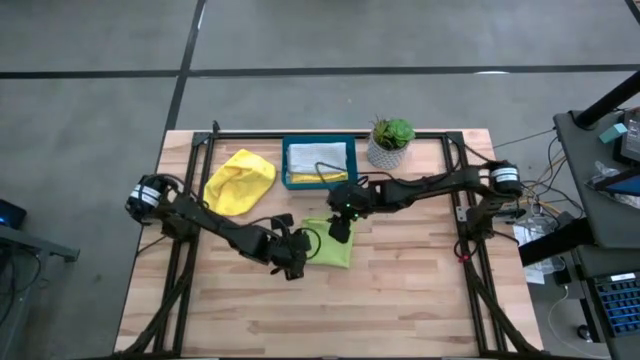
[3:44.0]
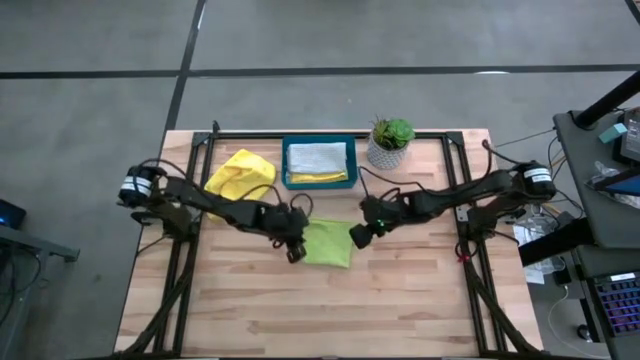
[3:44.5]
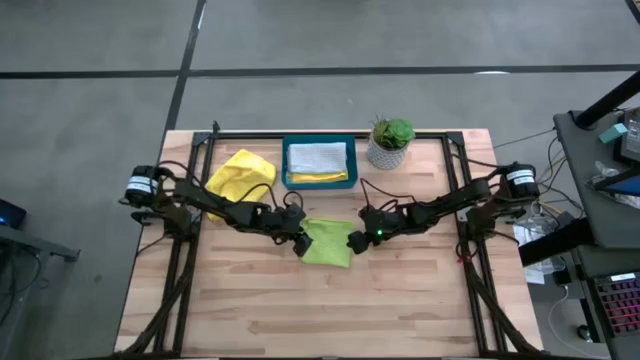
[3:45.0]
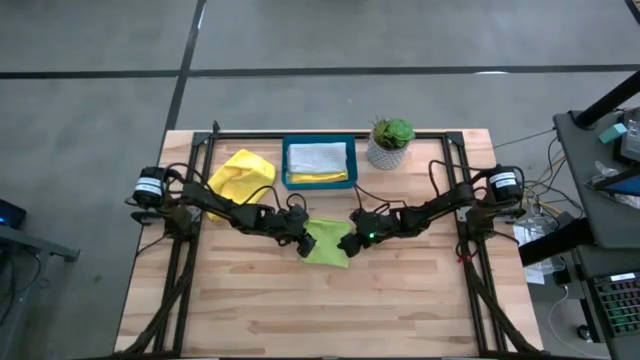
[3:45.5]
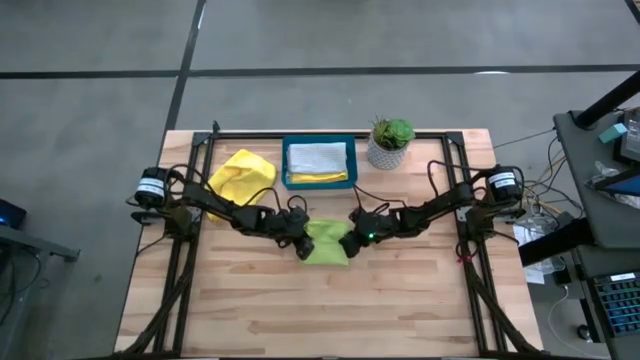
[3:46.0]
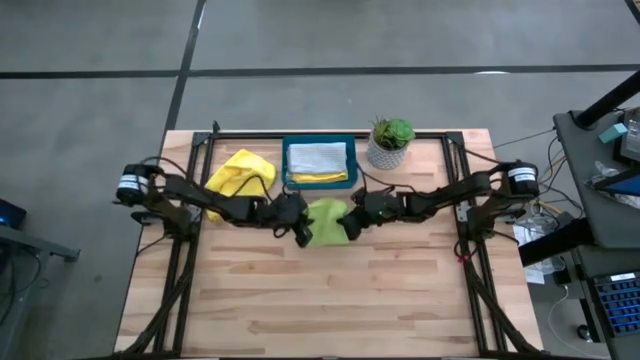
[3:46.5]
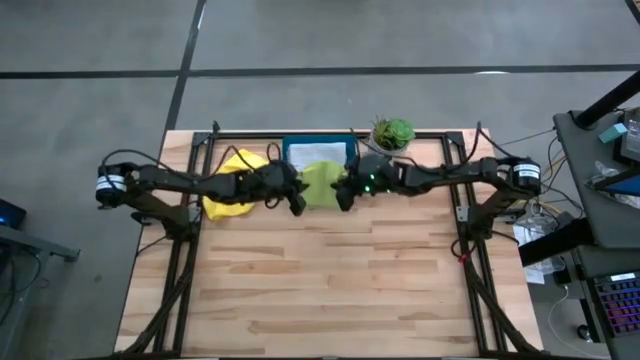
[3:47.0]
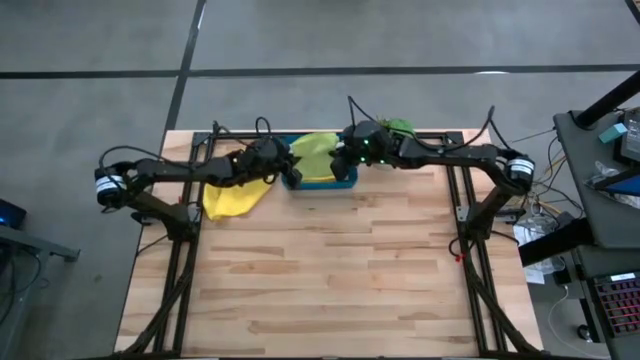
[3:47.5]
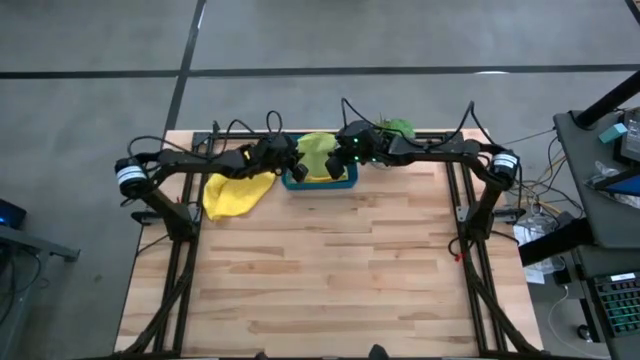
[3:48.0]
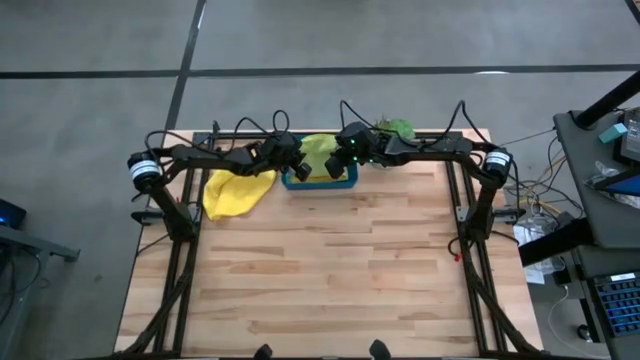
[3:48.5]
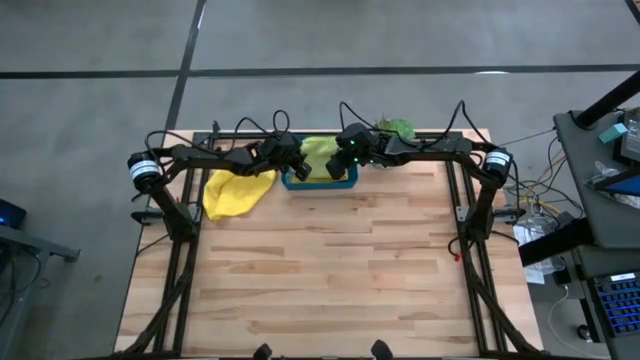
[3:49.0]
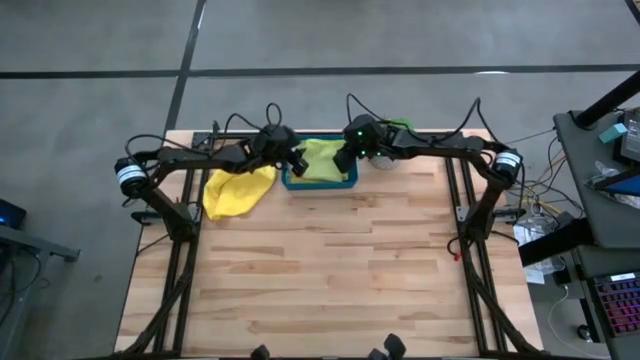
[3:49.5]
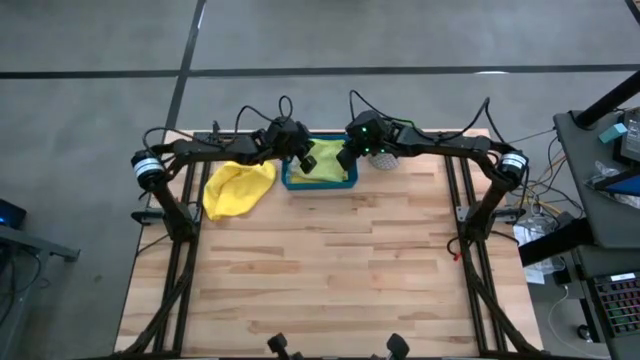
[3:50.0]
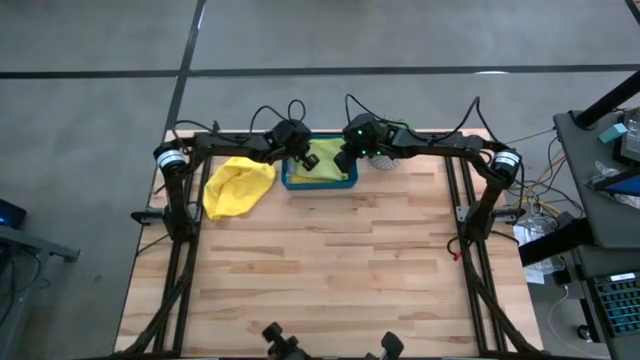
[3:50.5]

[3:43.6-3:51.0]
Task: Fold microfiber towels
Stack the folded green microfiber cloth on top of the gray microfiber cloth

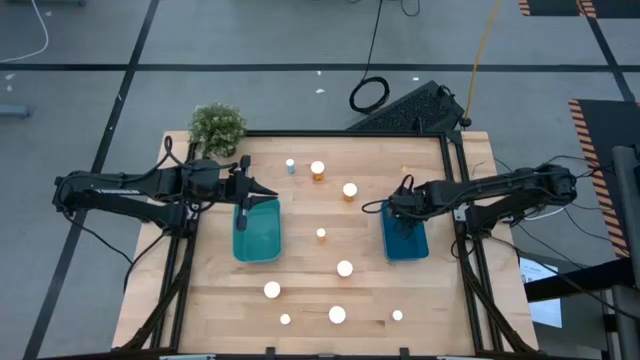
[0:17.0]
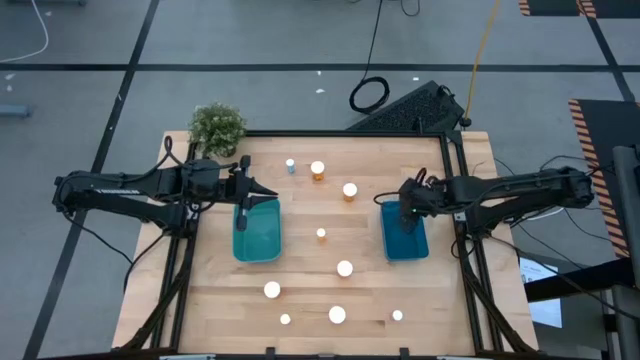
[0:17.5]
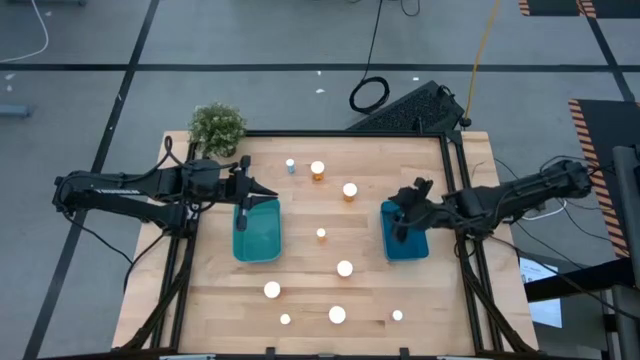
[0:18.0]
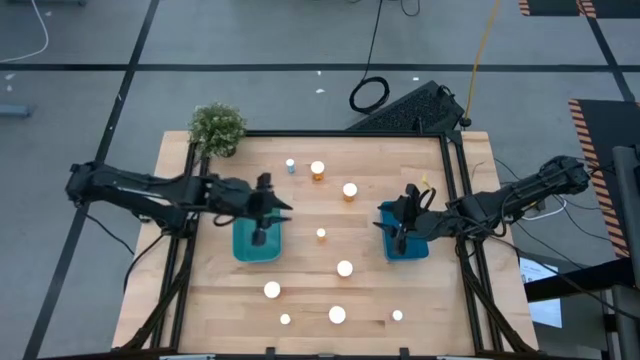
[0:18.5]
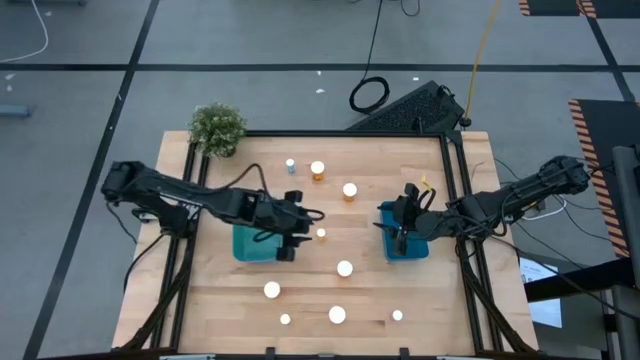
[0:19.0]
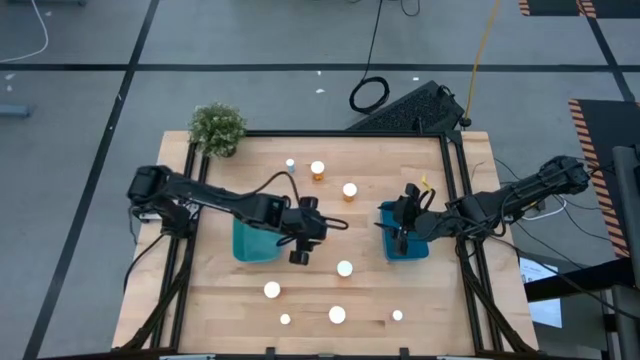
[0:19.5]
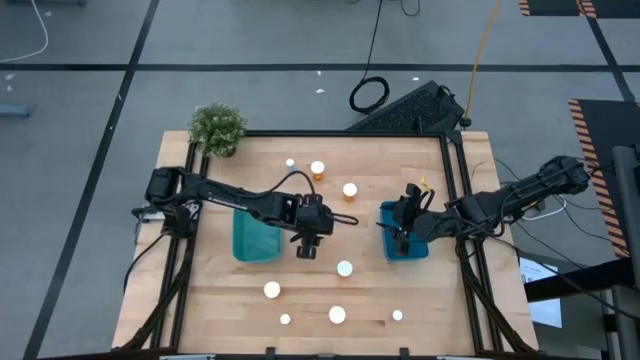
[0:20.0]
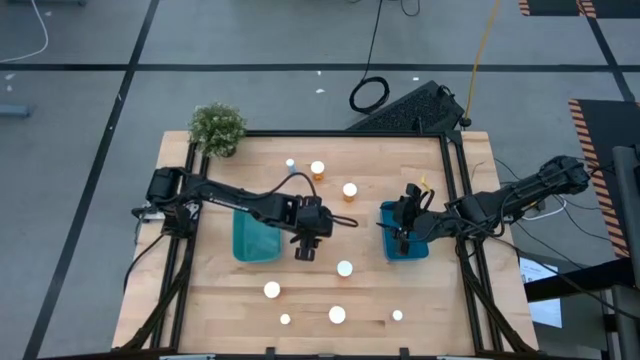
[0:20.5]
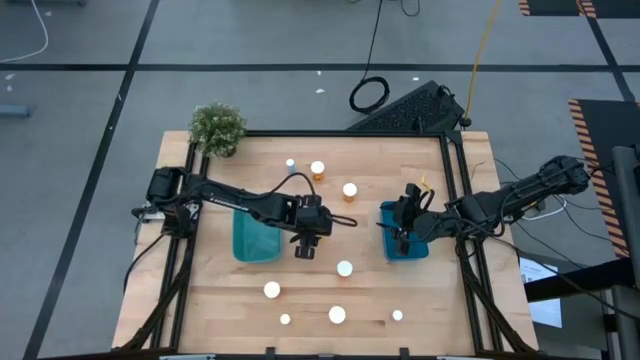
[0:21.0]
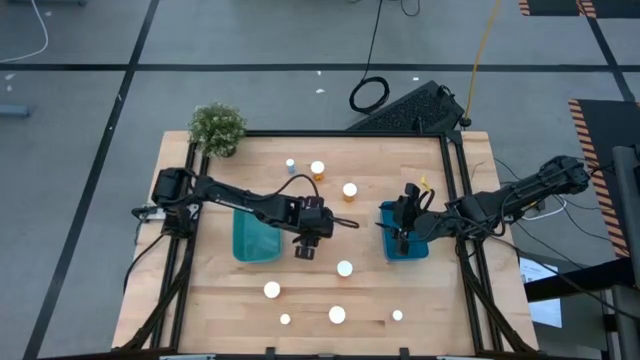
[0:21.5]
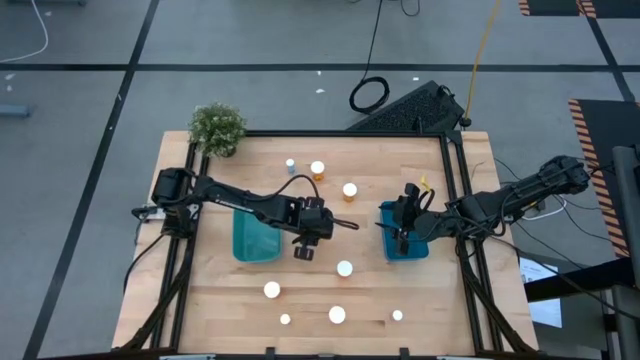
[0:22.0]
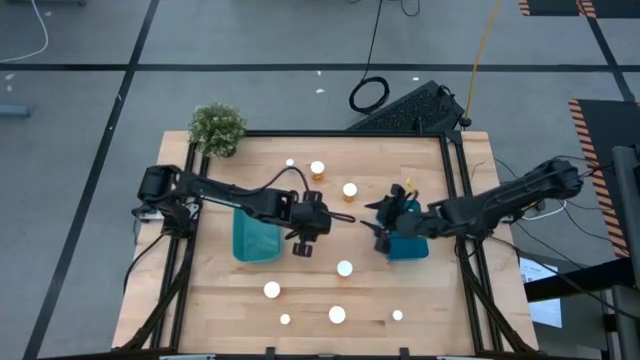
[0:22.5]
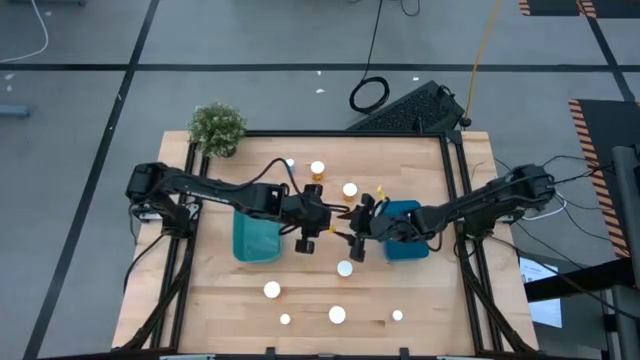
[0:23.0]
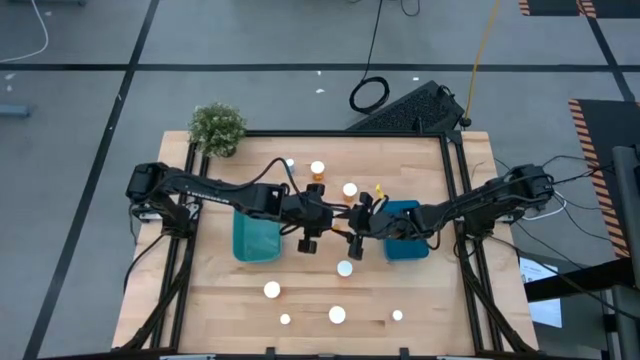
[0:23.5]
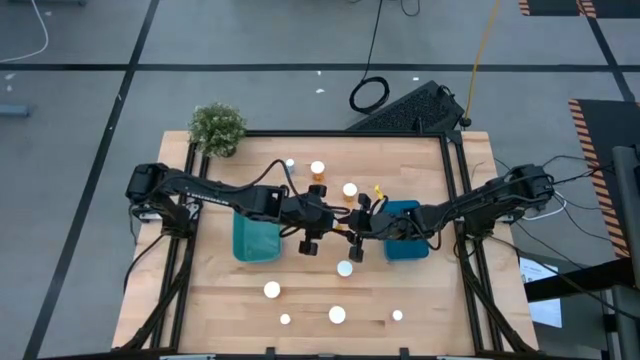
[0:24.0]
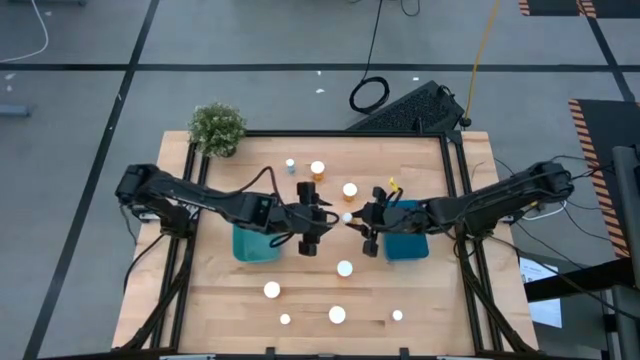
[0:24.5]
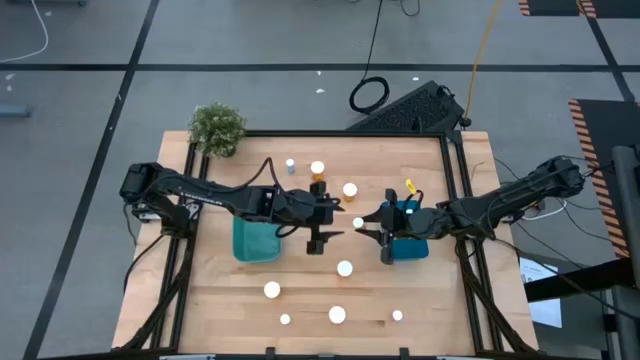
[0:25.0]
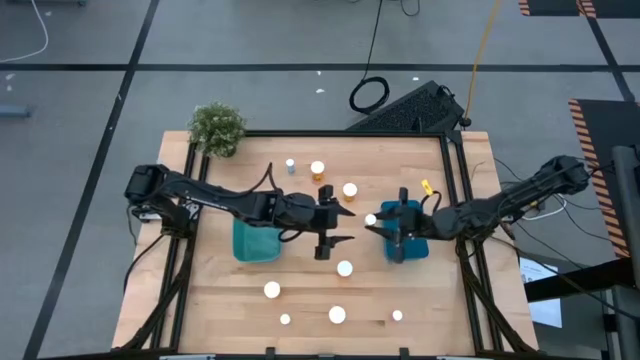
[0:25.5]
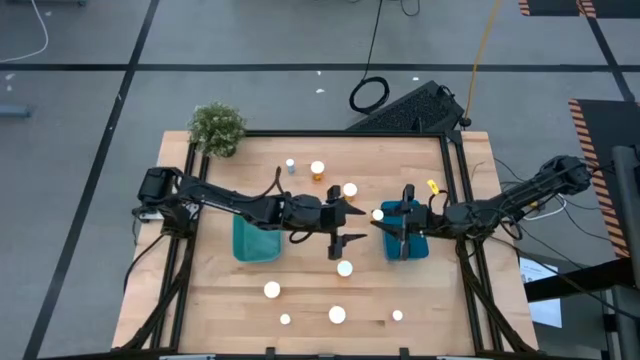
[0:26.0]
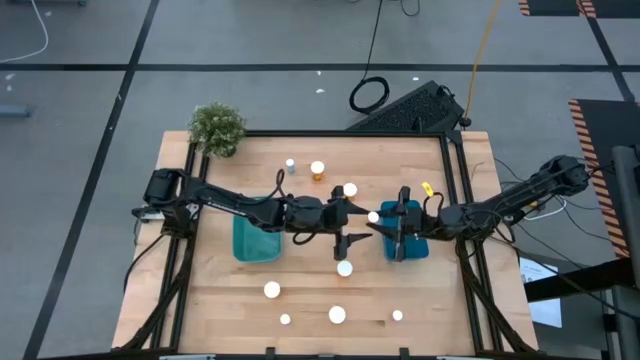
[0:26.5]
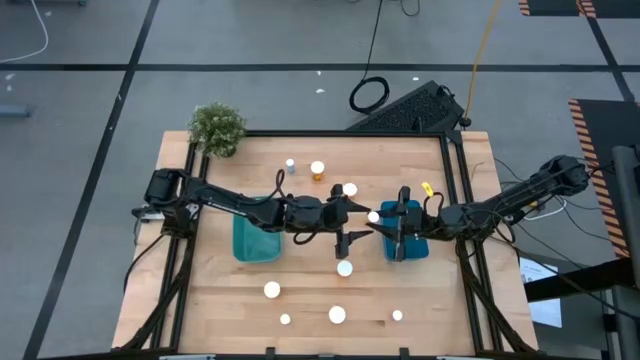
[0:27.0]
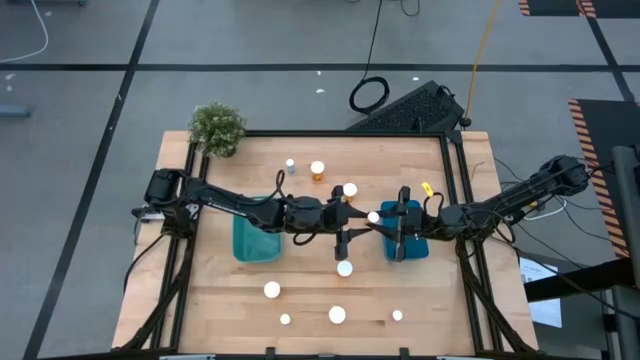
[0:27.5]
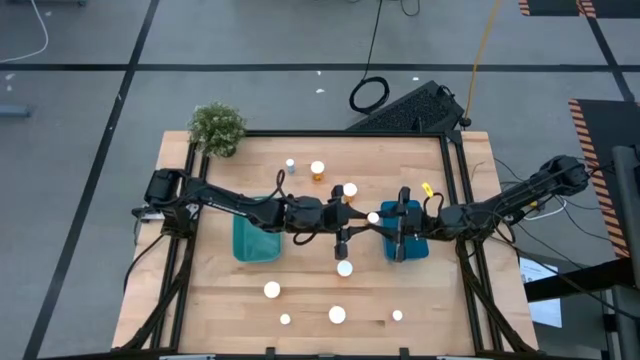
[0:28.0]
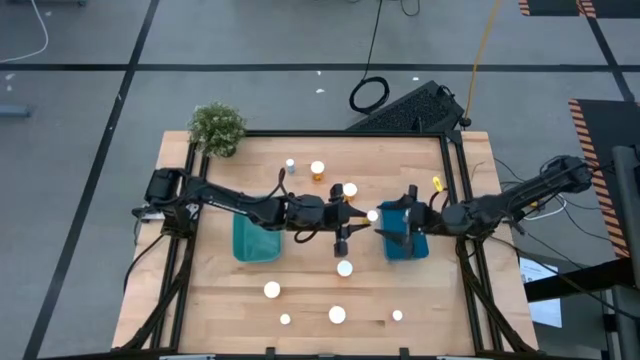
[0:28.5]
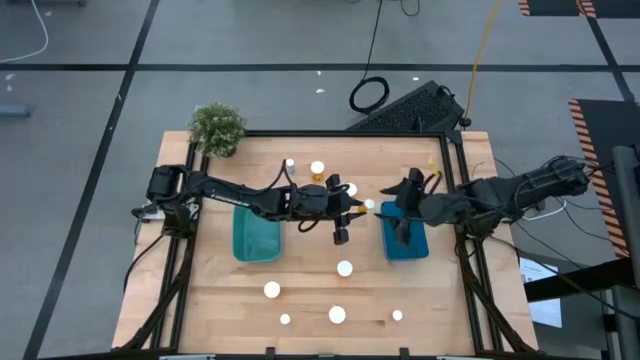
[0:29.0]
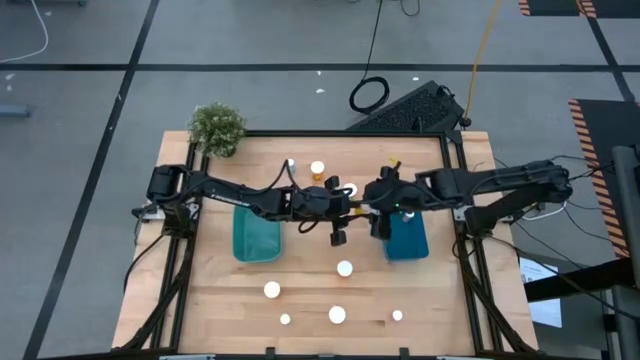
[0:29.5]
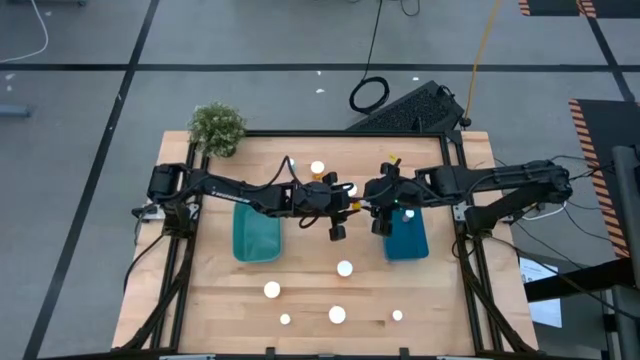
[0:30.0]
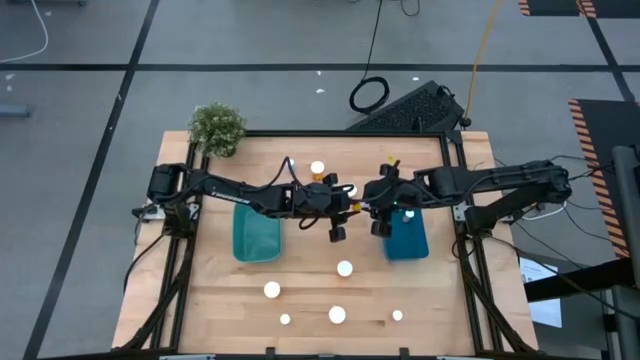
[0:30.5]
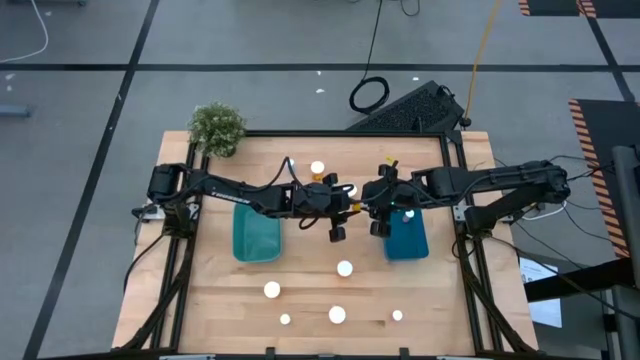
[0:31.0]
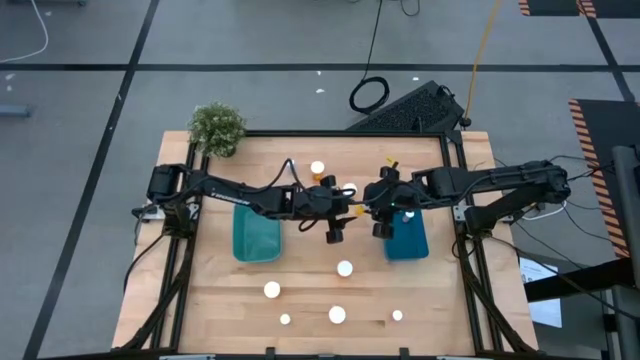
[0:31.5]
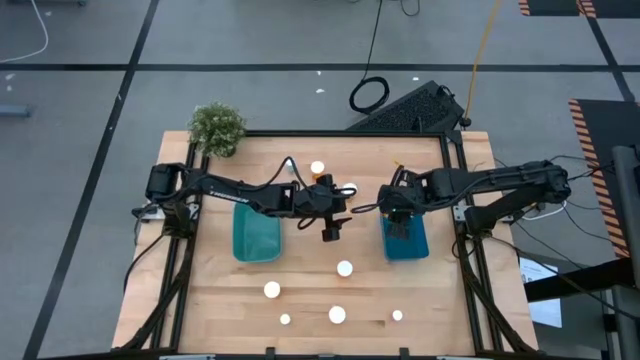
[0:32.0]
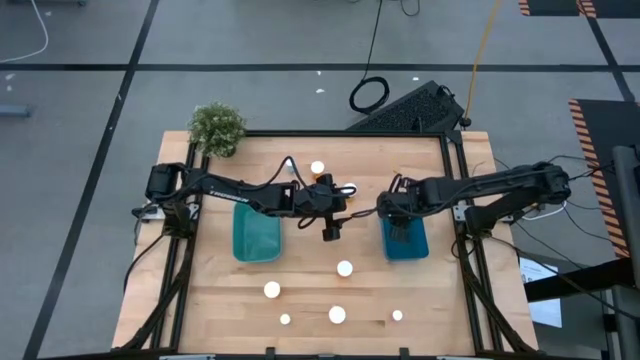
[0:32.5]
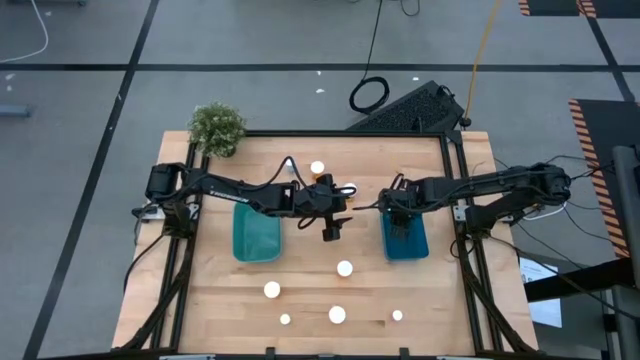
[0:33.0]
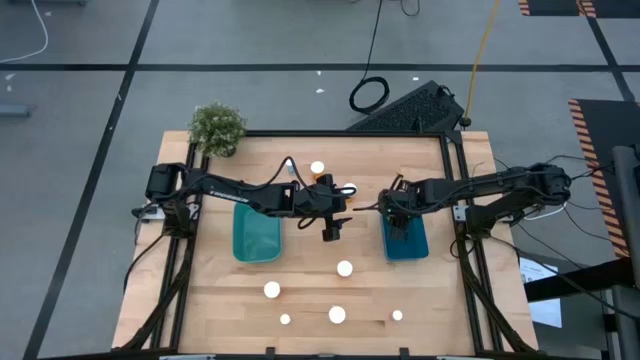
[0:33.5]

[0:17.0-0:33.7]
Task: Pick and place medicine bottles into bin by pill shape (circle, oval)
Put the small orange tablet bottle into the blue bin
